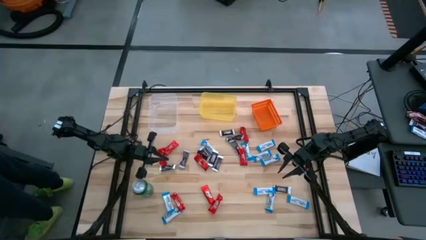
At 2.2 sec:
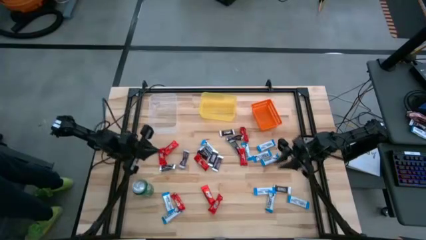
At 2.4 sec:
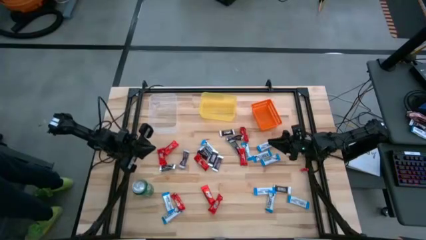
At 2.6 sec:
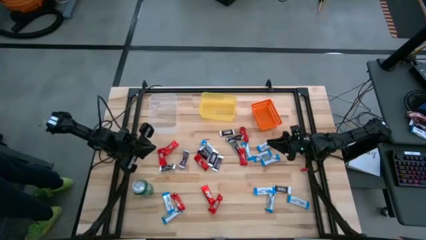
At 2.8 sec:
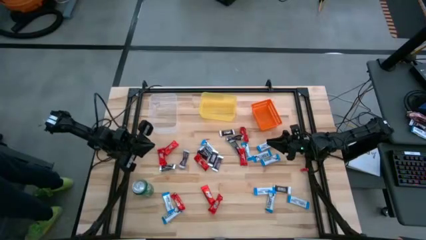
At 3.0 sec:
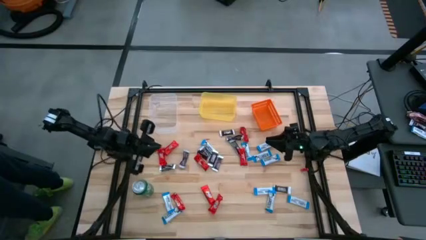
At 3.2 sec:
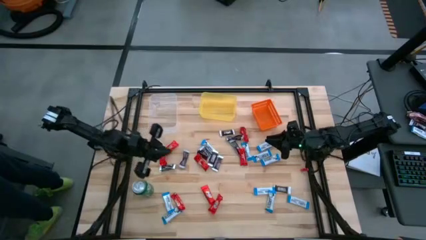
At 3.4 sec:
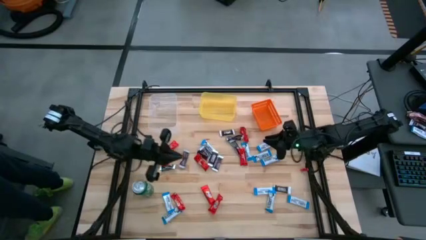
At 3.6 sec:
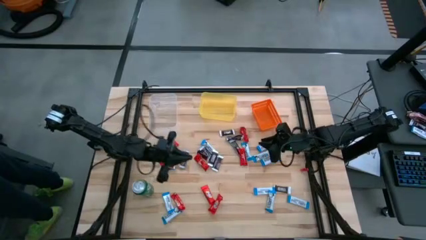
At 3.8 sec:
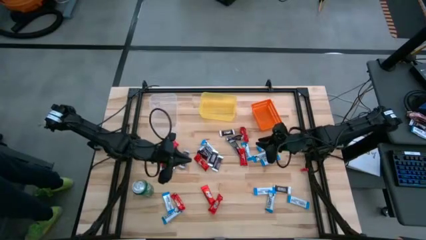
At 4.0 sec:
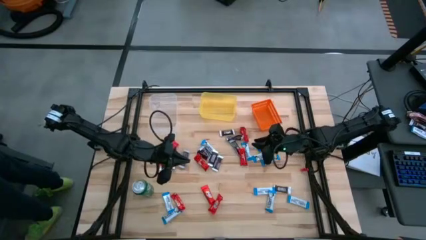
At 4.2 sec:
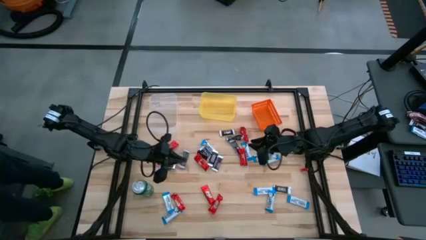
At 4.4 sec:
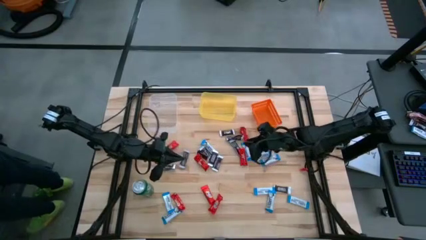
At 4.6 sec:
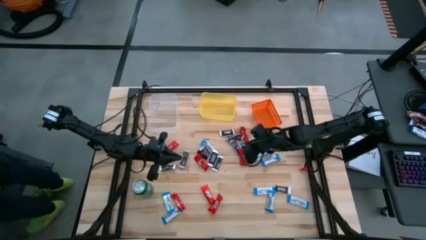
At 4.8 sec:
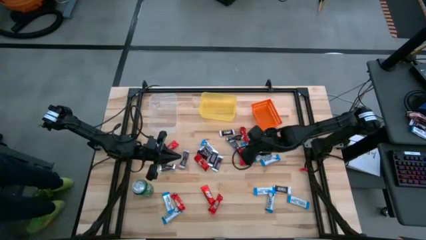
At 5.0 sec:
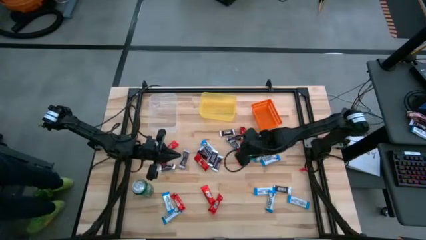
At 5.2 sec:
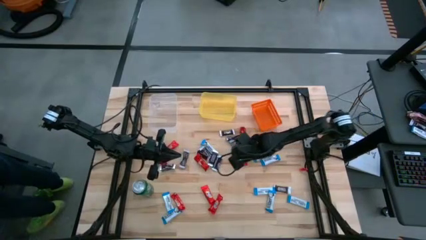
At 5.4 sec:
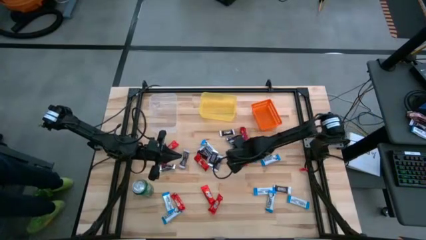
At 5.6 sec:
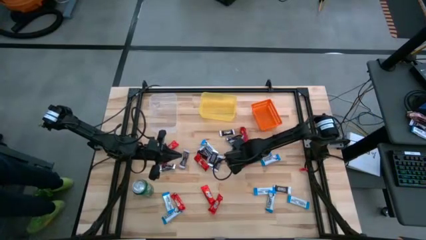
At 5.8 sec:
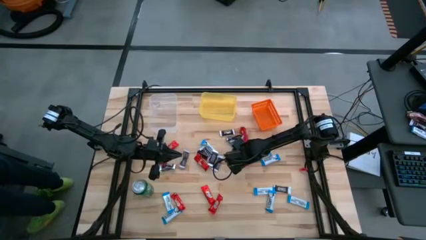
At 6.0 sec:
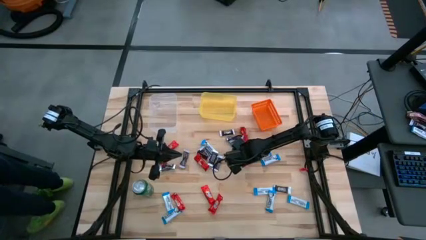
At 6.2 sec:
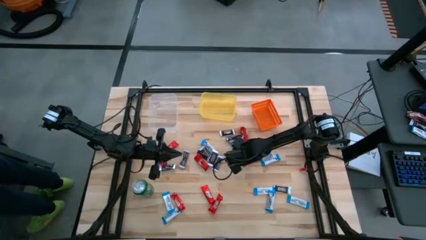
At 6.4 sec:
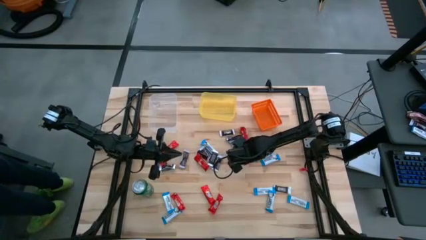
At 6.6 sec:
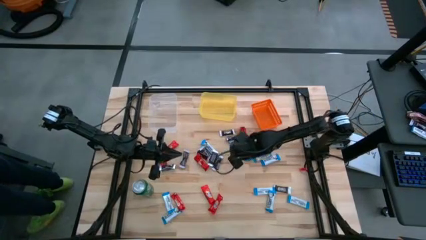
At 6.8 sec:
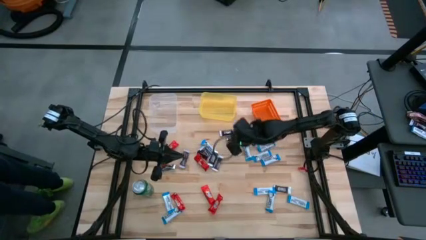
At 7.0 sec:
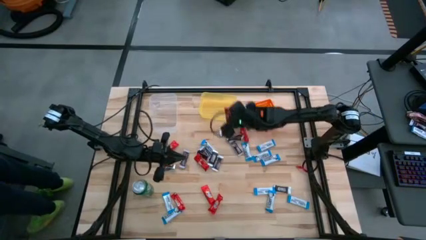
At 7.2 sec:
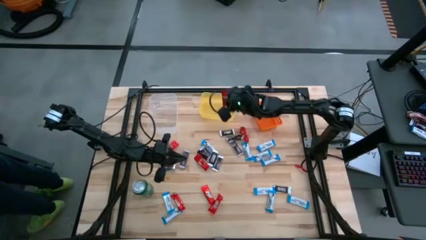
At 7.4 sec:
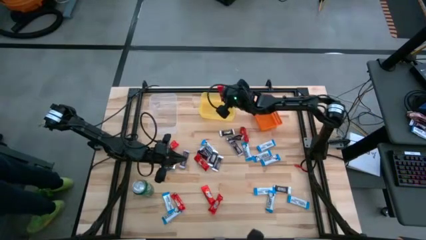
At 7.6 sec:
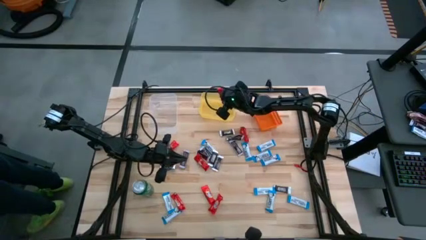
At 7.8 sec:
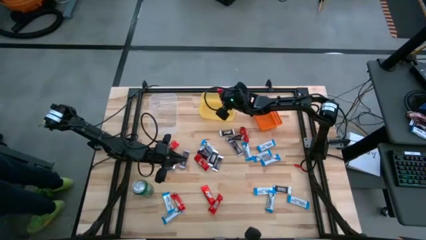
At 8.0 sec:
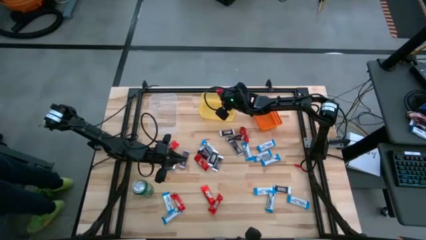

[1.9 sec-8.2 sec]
Task: Sort candy
Put the red chocolate bar into the yellow bin

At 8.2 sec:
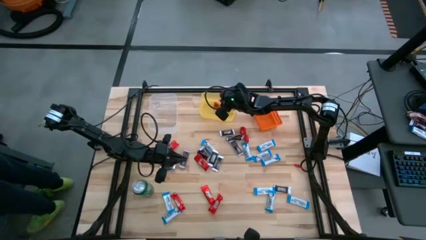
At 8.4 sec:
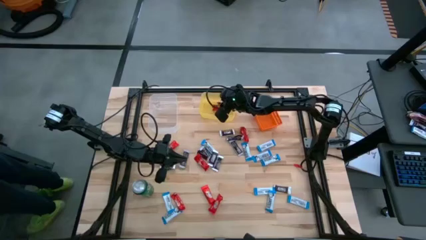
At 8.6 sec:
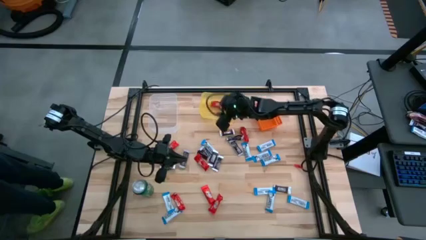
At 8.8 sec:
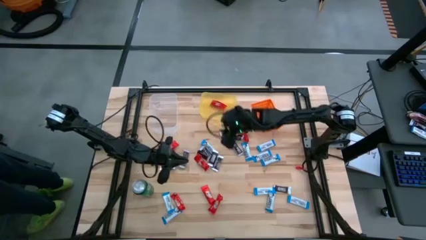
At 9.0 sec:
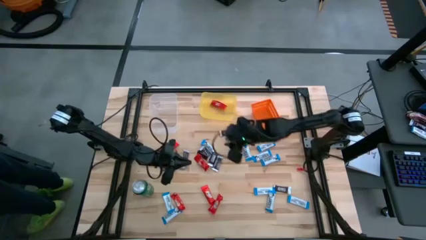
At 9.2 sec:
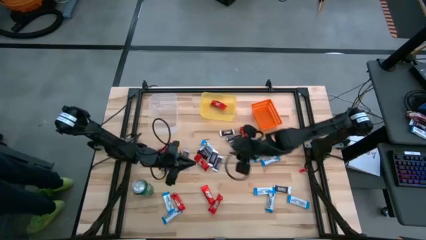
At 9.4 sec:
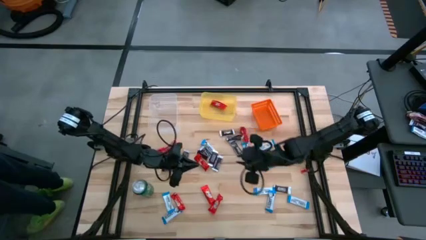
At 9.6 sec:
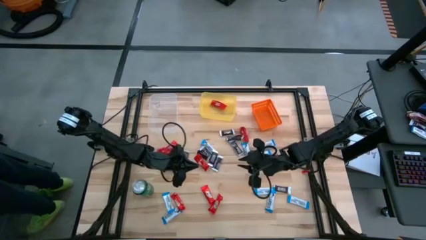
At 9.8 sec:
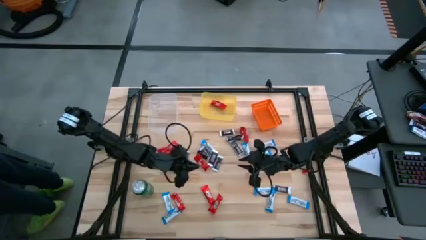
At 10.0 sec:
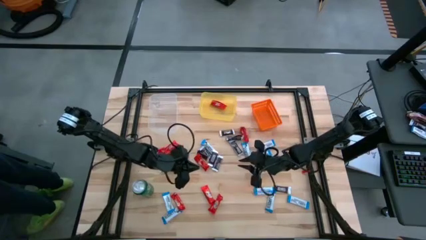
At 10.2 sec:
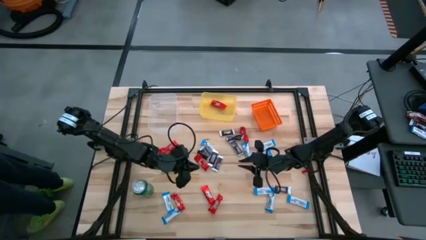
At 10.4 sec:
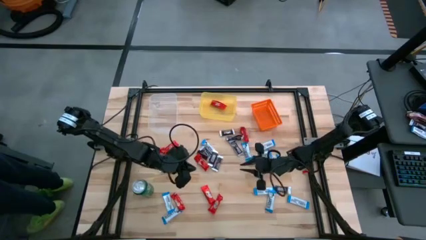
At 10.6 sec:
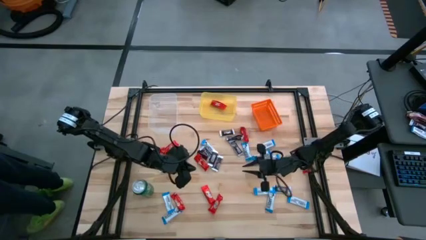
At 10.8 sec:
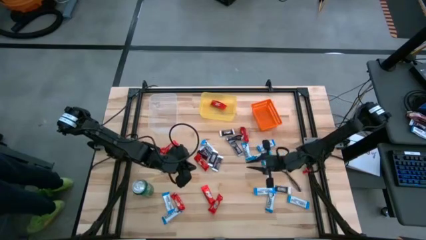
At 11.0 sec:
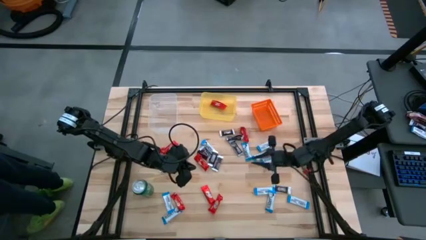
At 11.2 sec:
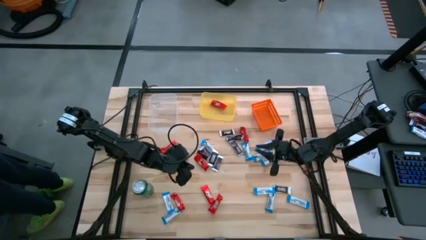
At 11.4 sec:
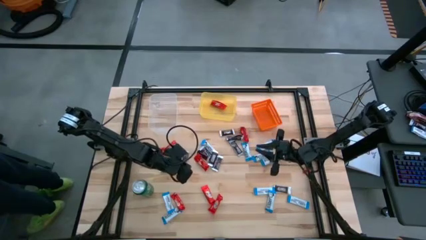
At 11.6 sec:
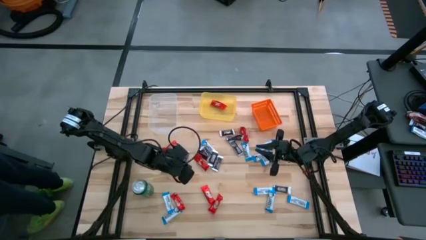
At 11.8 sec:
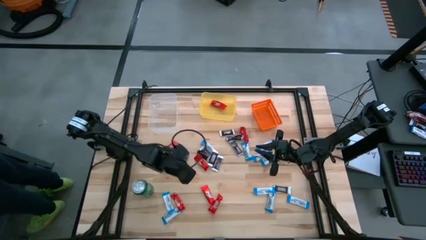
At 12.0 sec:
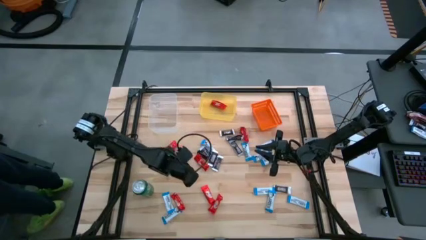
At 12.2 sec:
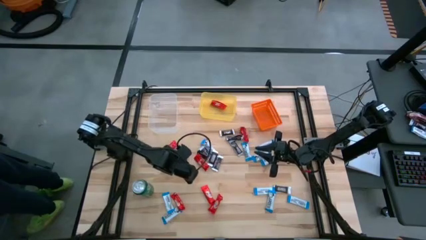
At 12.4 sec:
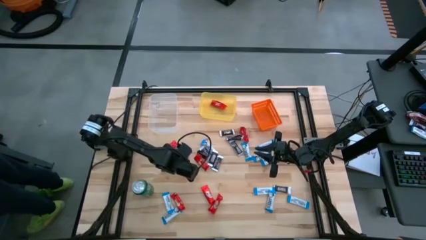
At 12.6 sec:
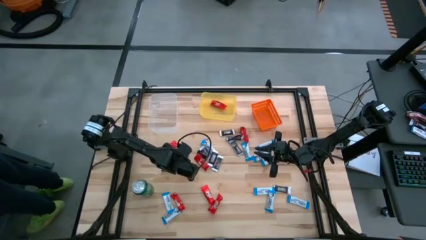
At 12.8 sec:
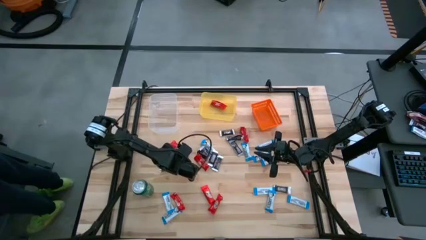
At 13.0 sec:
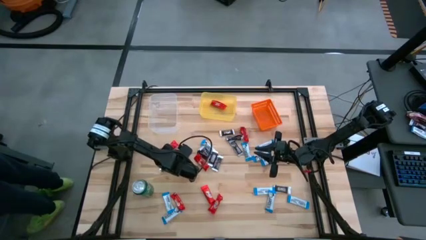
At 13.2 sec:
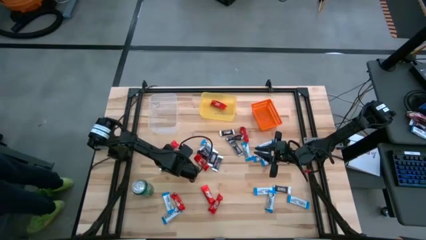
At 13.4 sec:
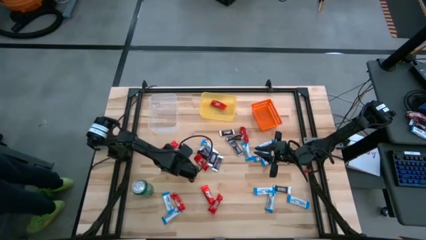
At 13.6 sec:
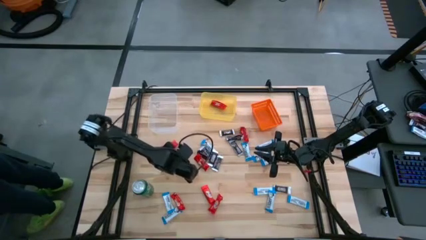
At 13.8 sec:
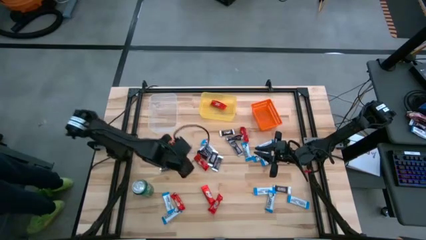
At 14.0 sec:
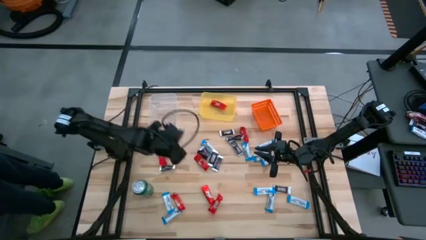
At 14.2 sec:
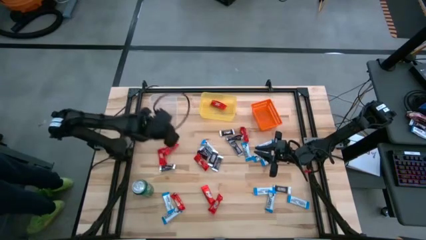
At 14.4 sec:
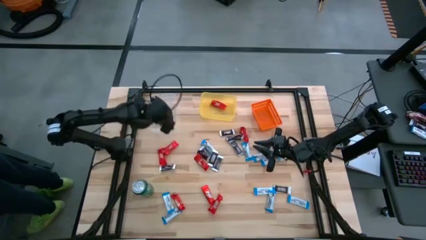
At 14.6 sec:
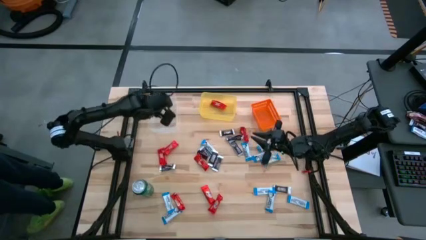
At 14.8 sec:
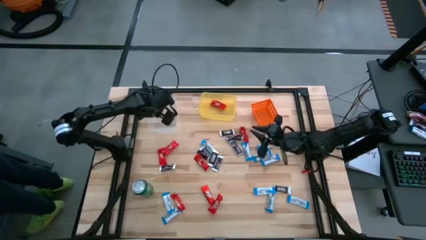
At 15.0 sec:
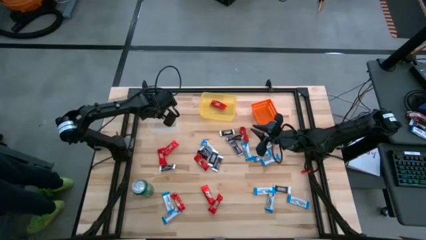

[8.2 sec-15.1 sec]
Put the brown chocolate bar into the transparent bin

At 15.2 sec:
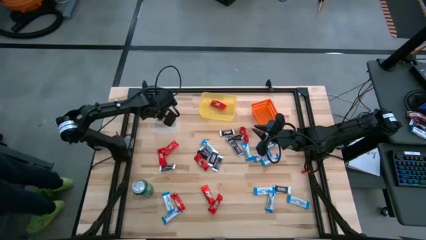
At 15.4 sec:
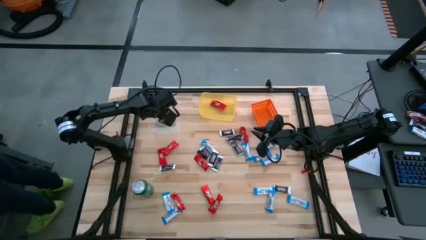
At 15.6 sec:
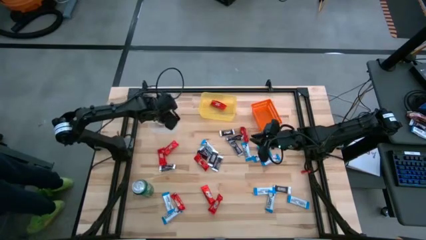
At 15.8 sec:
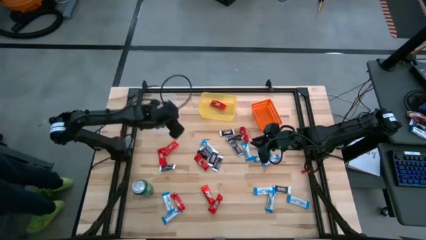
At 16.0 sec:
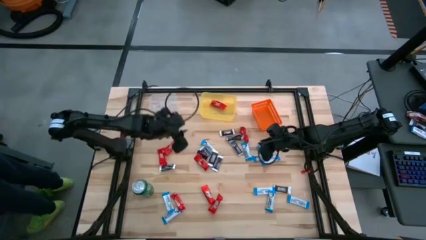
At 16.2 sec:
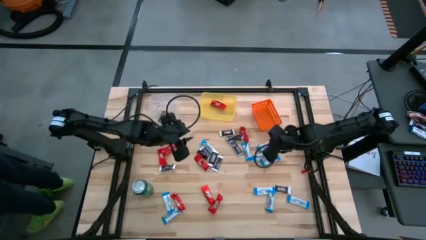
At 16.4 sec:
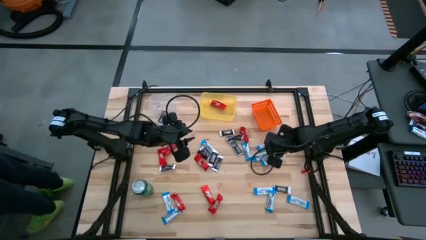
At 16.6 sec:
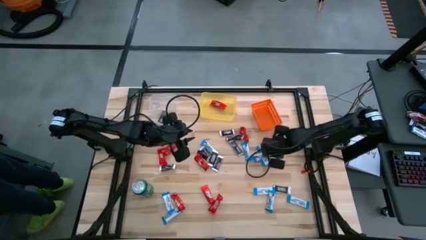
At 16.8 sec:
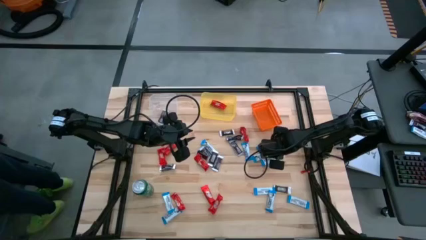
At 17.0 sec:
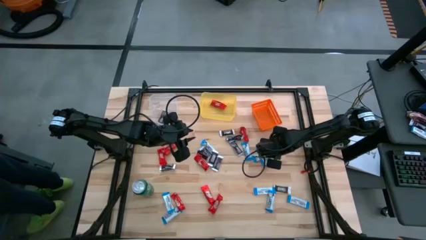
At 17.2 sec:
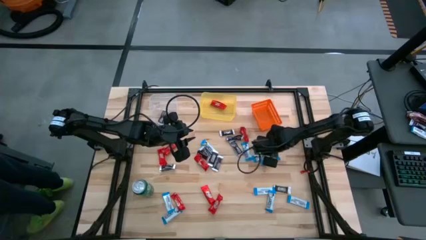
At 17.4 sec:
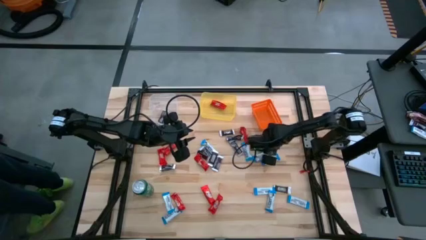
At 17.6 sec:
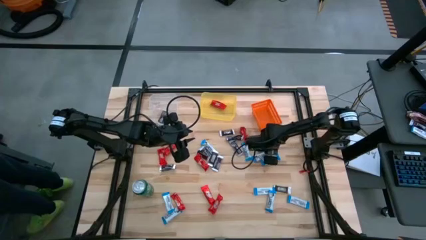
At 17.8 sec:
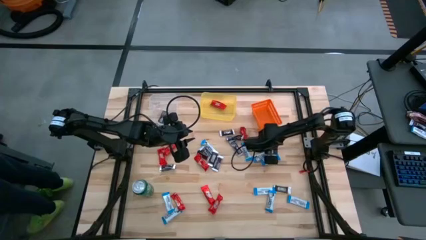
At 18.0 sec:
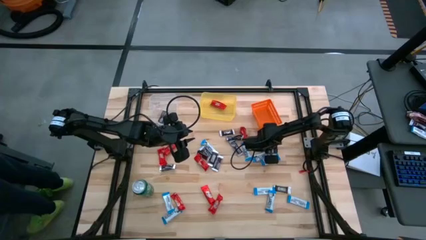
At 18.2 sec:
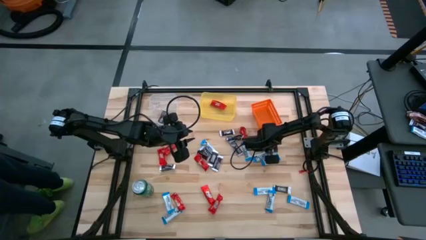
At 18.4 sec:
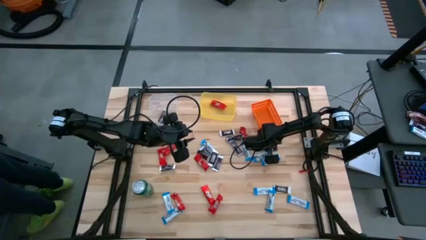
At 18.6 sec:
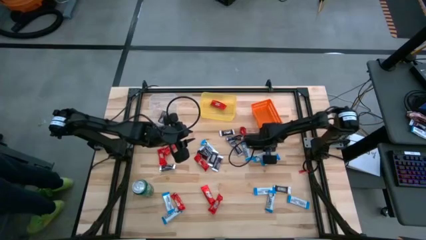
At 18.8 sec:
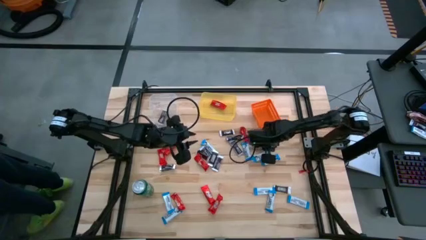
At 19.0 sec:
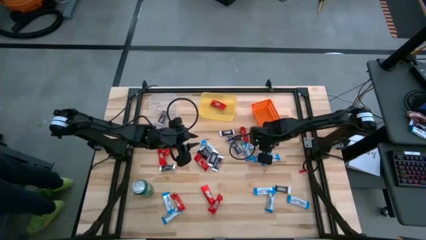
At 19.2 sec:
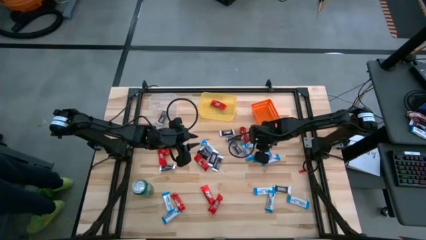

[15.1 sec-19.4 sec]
Put the white chocolate bar into the orange bin
